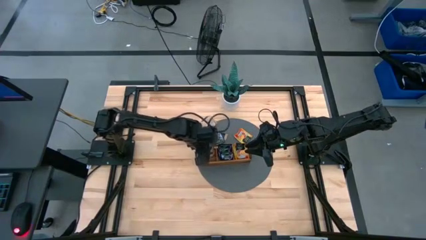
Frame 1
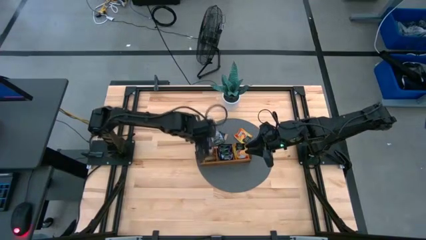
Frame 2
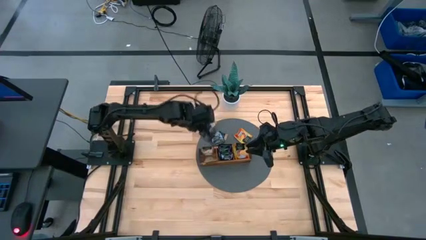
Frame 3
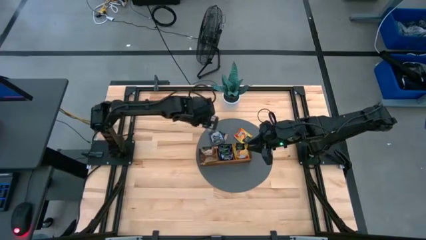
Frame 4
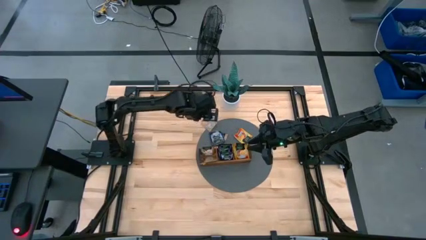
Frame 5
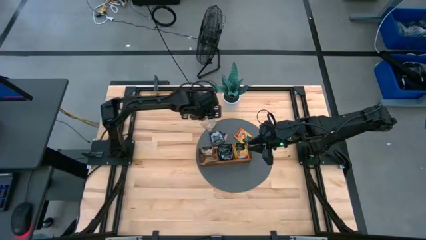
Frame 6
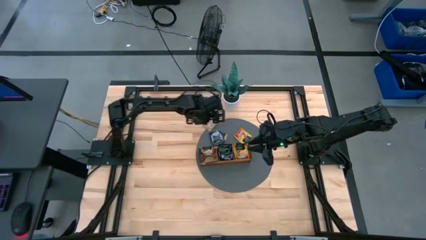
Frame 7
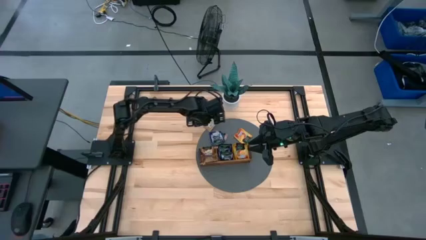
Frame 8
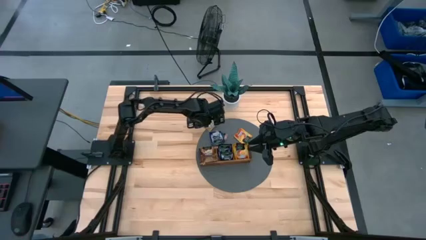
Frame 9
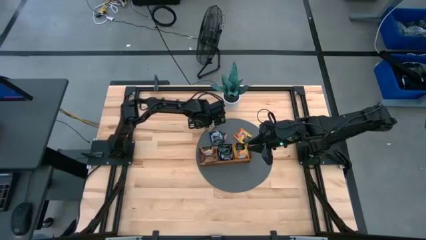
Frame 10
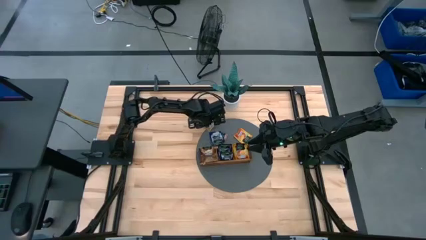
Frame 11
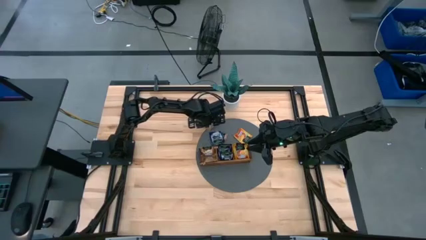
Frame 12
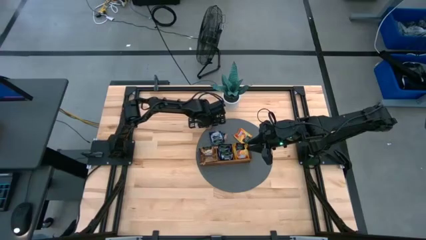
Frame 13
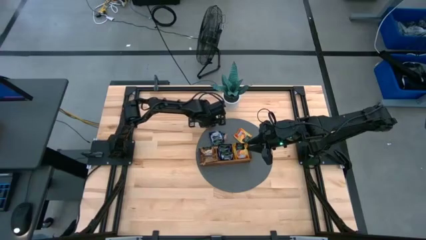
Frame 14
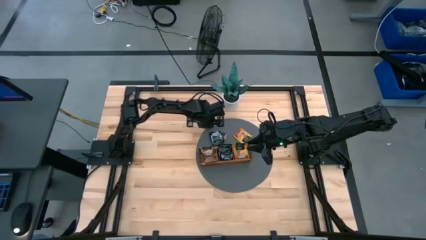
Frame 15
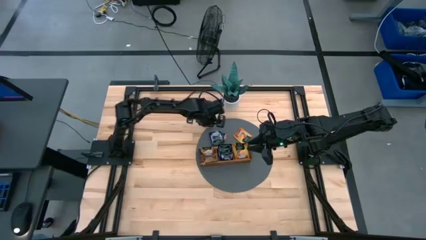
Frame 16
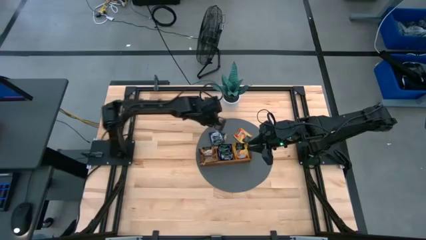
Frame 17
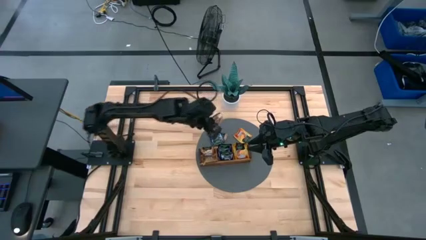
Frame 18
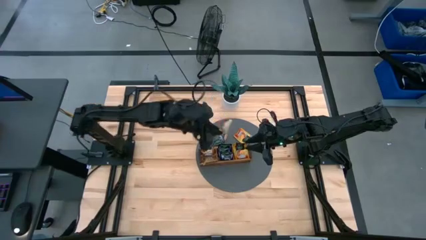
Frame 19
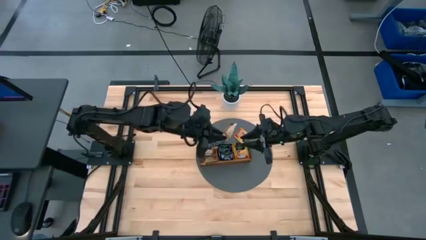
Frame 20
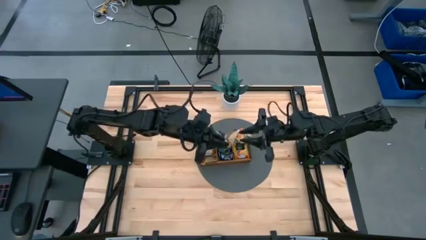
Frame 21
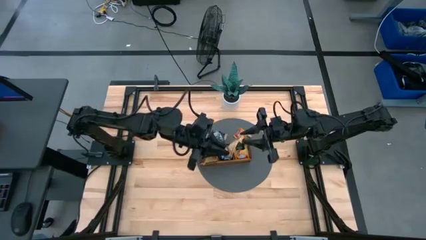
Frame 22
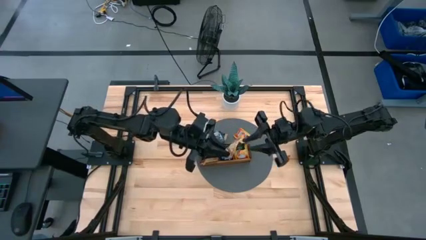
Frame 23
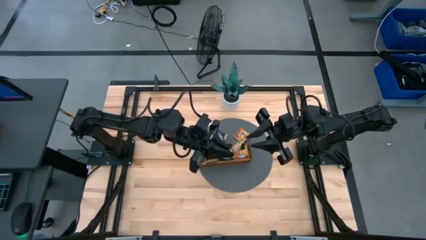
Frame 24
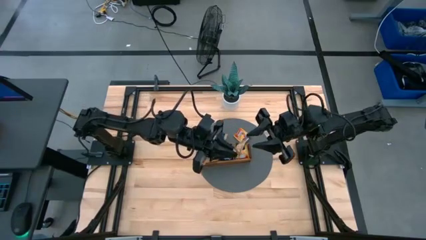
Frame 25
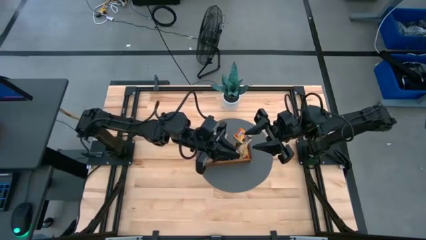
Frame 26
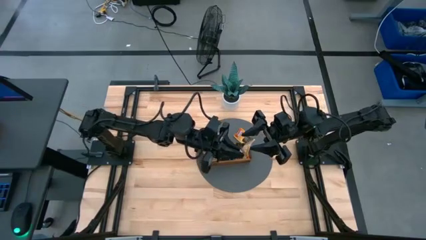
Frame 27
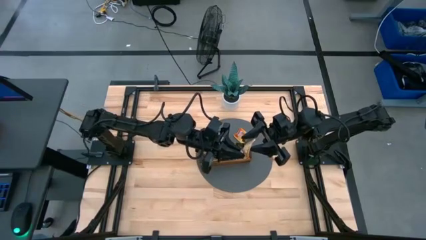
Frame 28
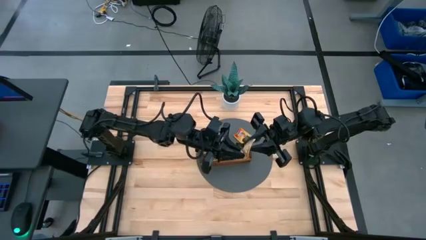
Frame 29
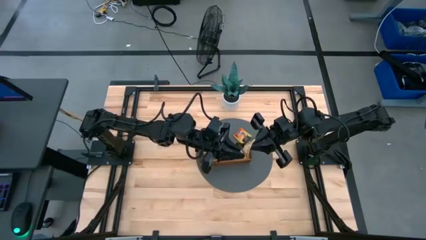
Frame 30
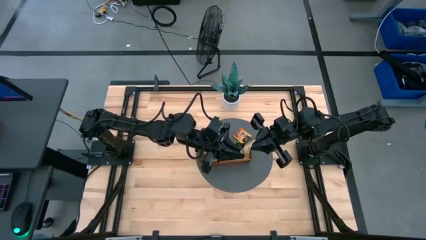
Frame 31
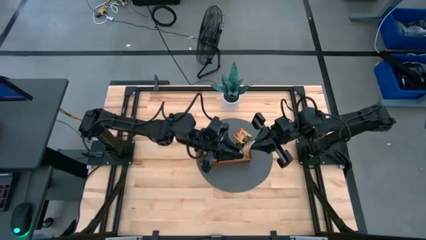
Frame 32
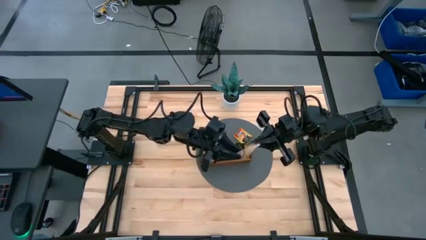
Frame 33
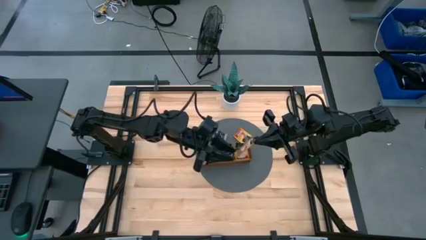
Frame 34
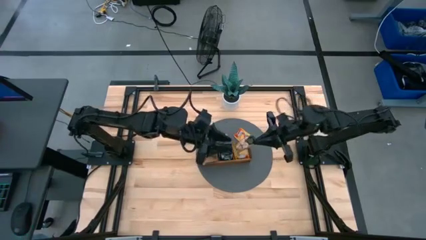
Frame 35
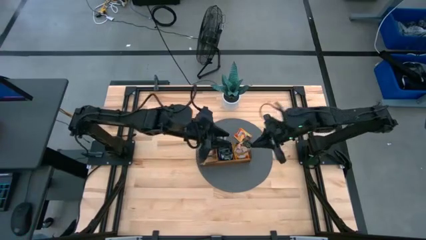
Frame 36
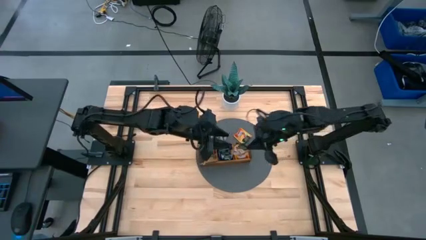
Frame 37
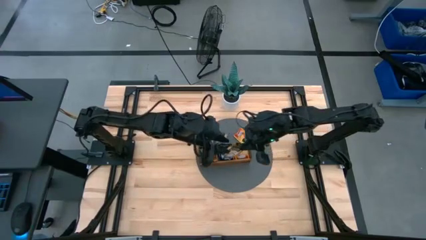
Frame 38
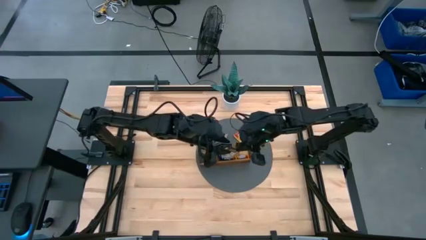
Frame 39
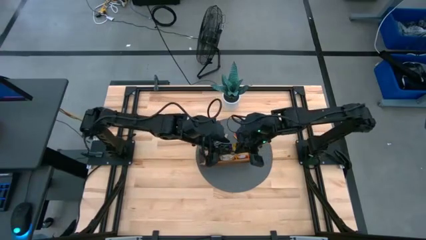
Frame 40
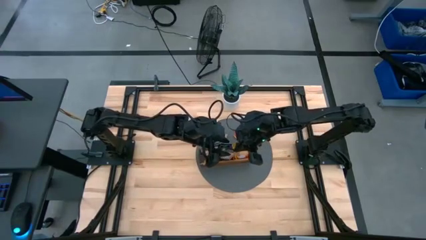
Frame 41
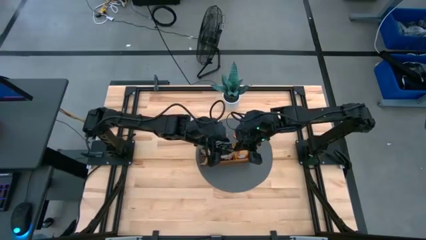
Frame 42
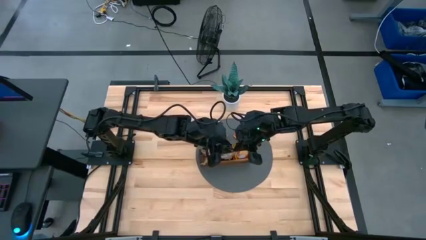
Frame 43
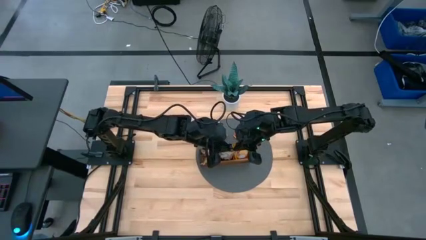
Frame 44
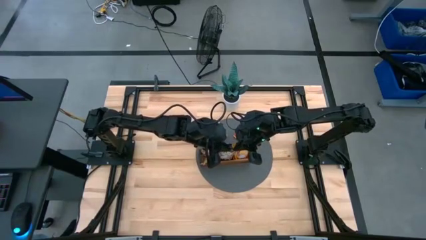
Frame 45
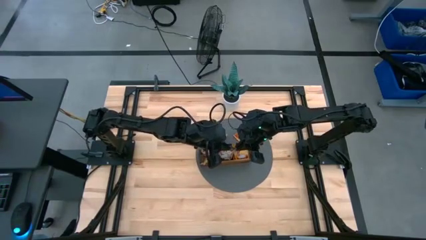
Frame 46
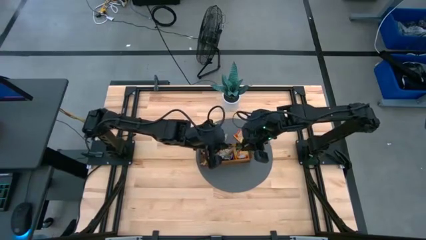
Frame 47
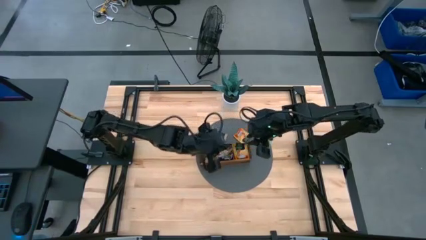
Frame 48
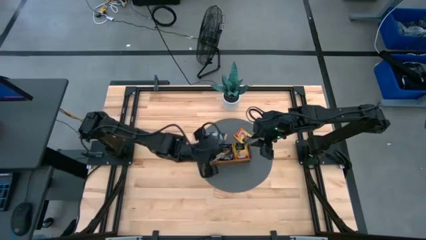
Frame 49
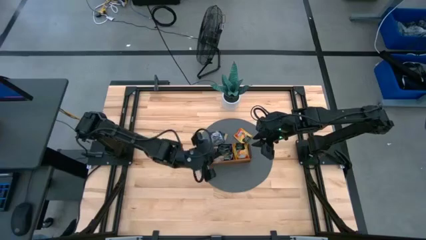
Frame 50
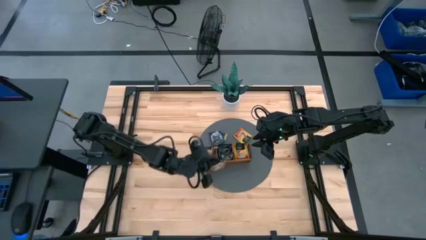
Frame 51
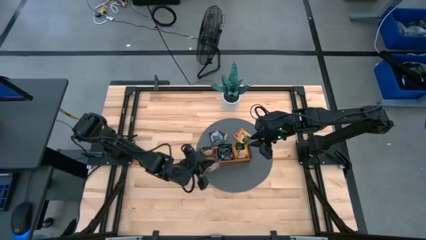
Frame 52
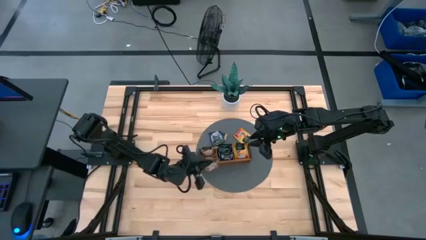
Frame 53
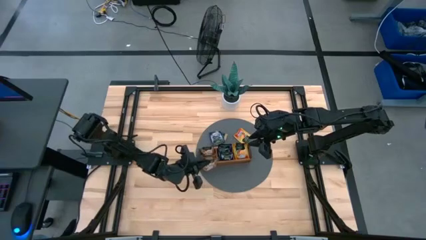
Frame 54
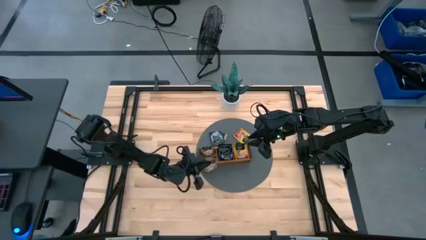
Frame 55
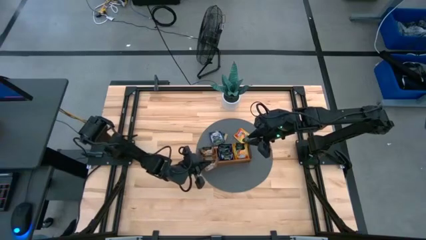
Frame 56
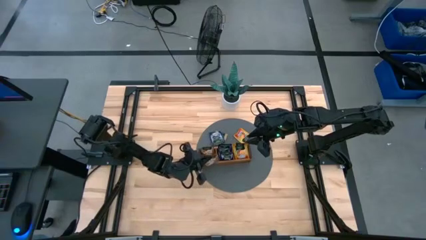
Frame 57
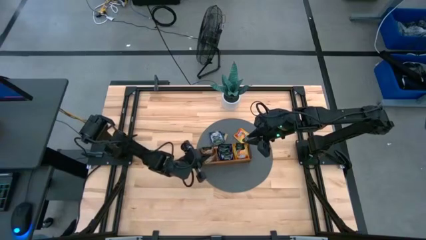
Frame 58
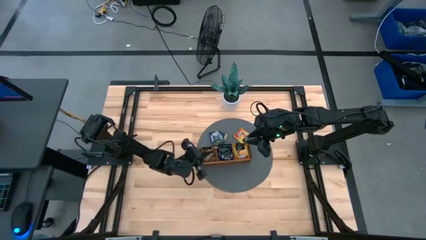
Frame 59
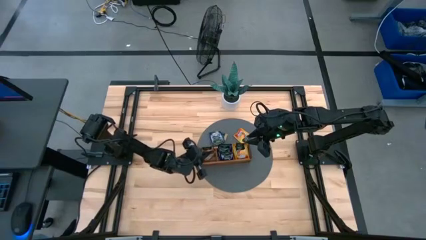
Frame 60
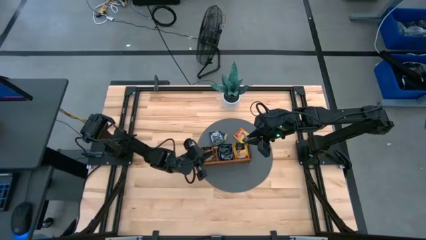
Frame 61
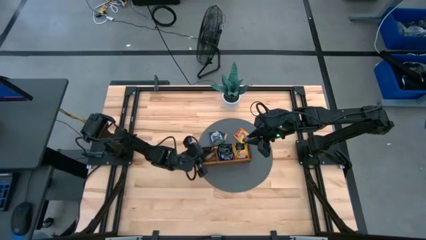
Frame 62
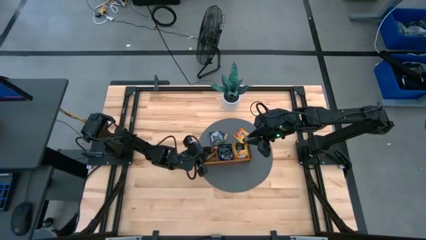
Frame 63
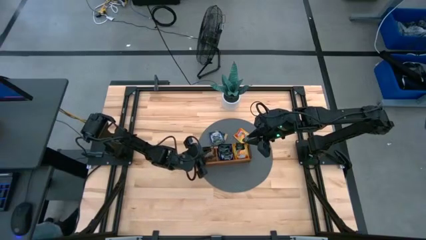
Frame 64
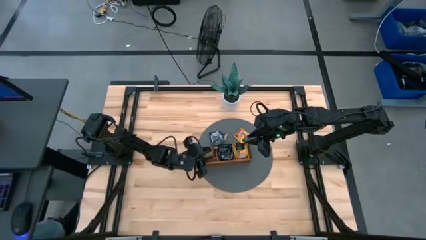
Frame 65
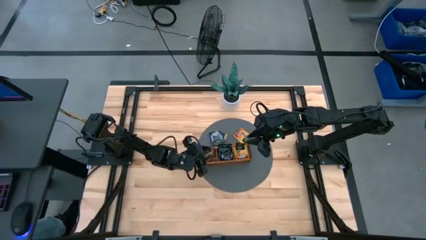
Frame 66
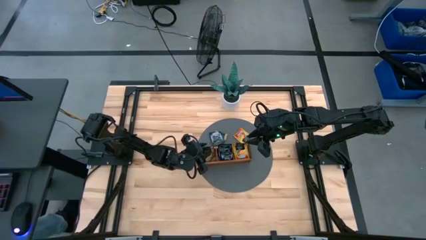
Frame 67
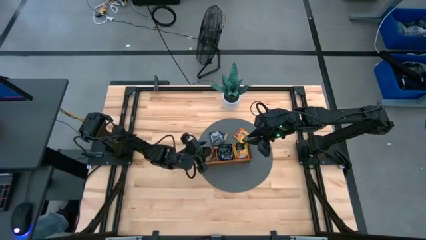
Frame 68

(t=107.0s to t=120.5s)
Task: Pick & Place Tea
Put the brown tea bag into the left section of the wooden organizer

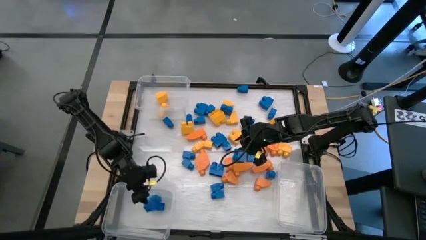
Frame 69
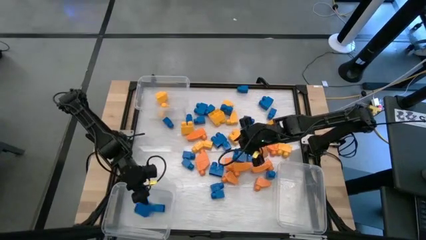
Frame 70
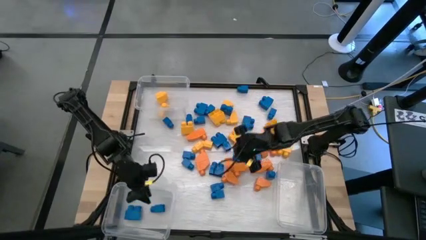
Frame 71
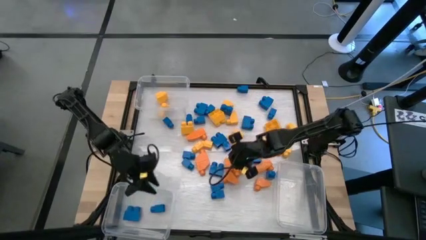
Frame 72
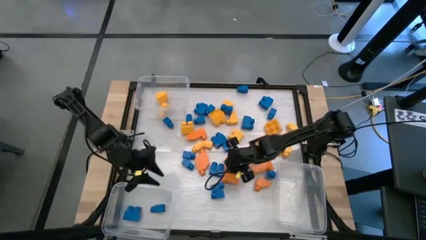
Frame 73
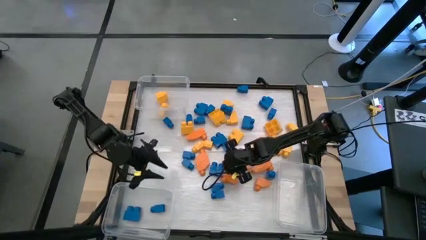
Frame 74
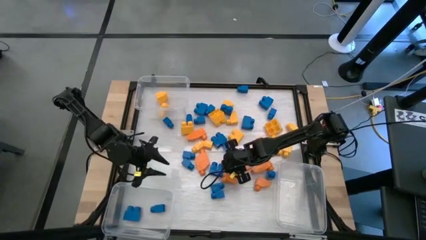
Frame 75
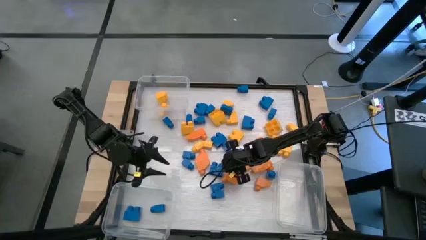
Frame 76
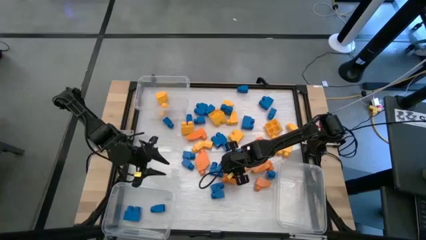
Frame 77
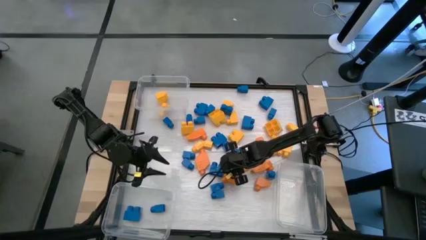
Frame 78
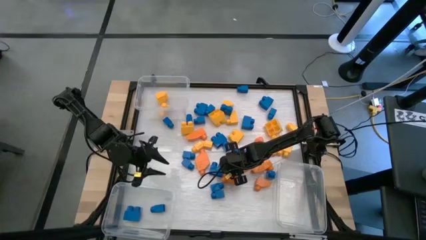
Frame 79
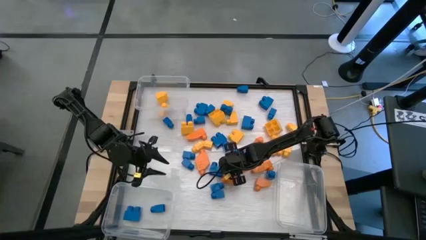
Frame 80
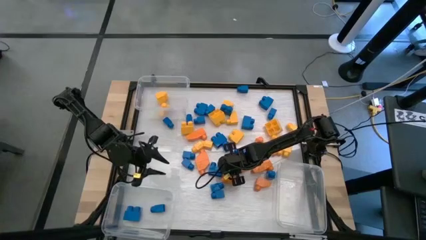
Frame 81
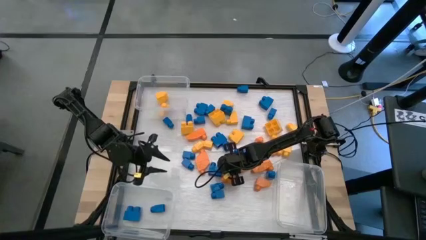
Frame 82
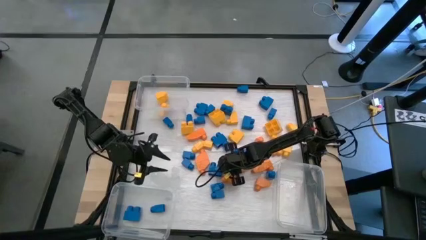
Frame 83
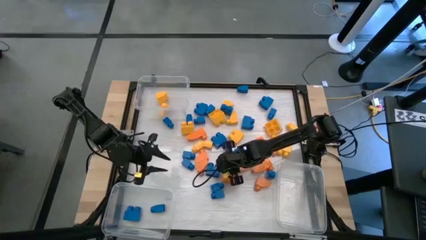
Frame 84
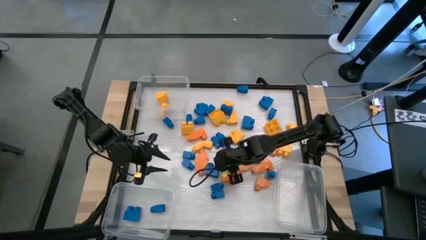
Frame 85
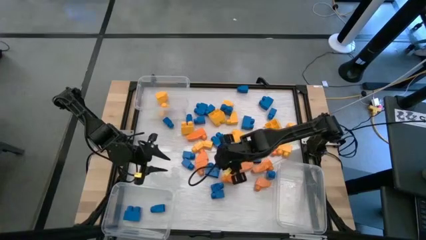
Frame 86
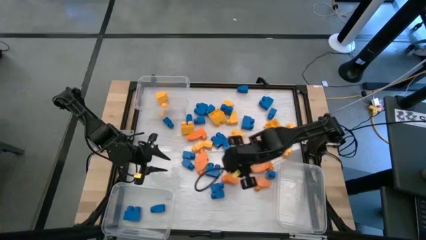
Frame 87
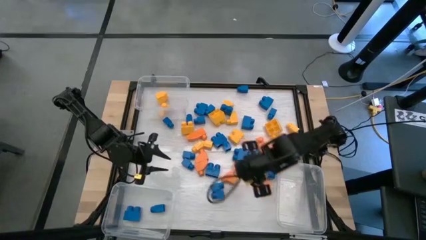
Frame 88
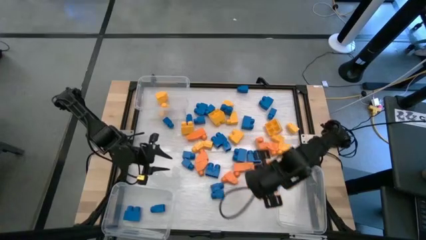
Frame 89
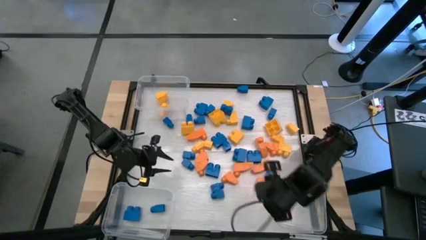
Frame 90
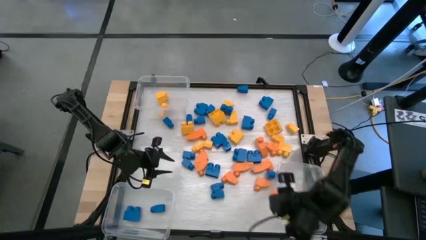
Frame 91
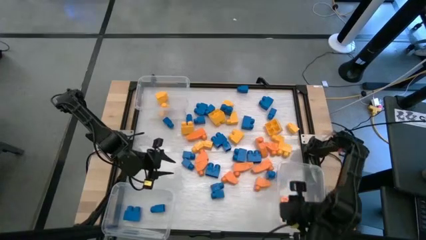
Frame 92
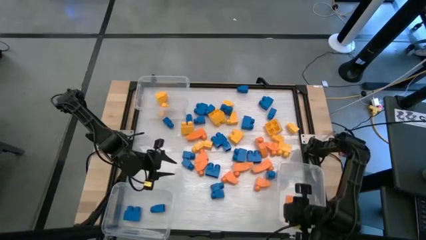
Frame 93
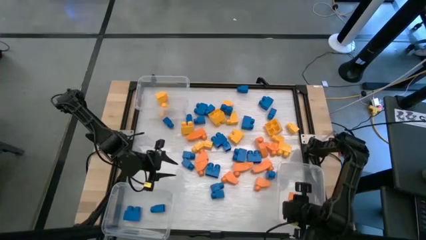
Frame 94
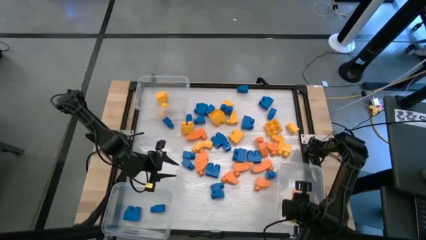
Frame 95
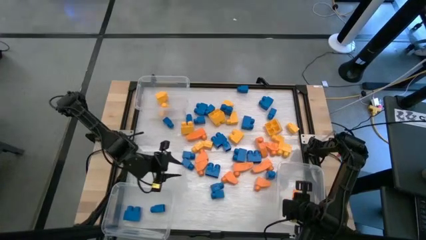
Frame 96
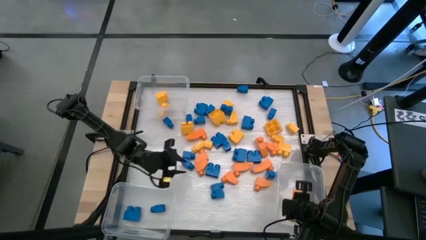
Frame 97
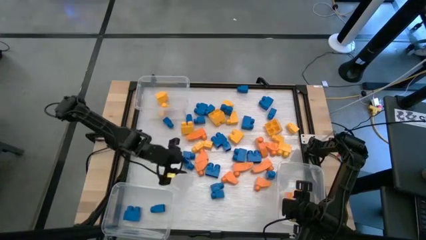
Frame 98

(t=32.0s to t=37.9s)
Task: Sort blocks
Put the orange game piece into the bottom right transparent bin
